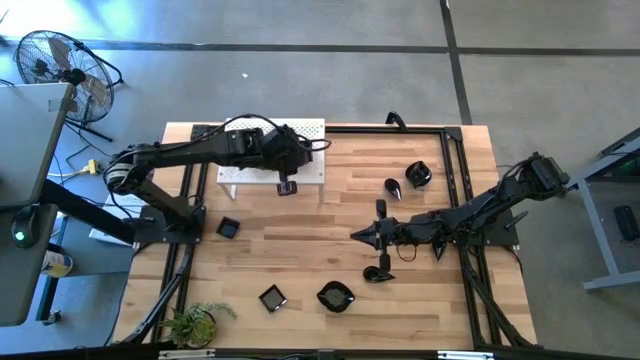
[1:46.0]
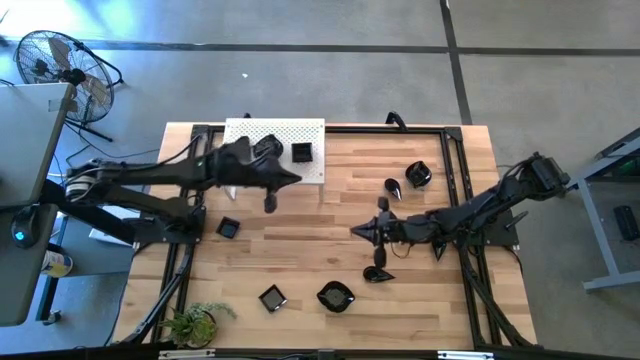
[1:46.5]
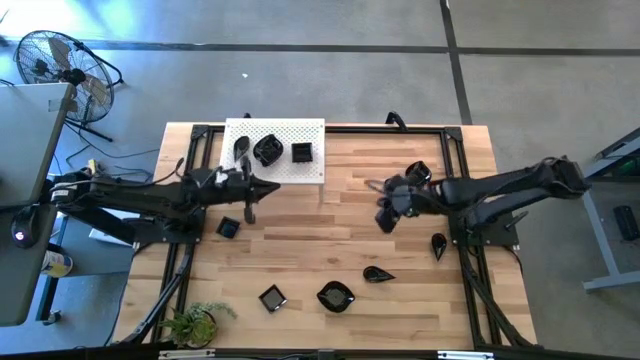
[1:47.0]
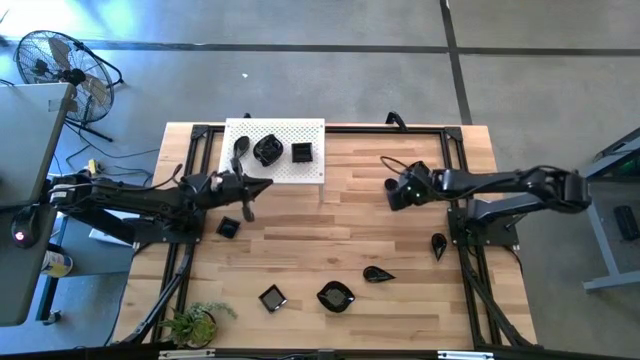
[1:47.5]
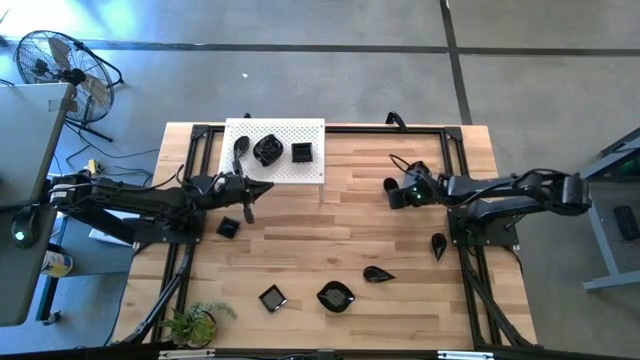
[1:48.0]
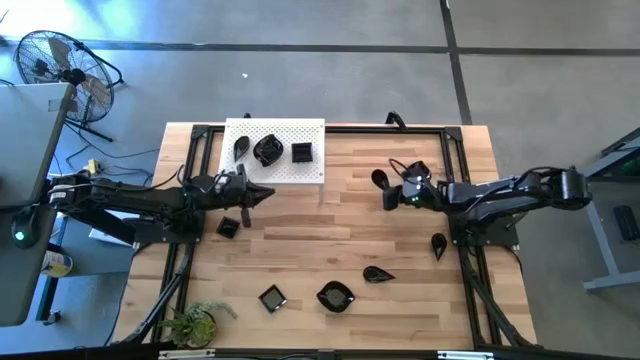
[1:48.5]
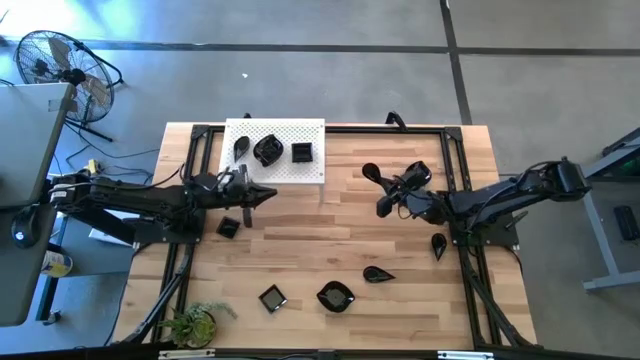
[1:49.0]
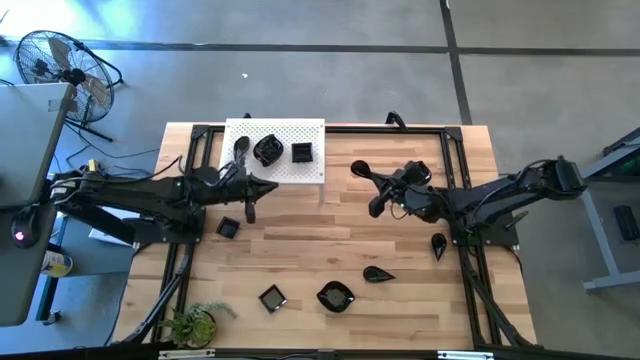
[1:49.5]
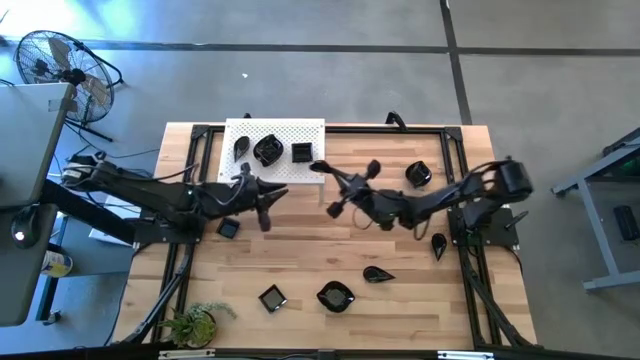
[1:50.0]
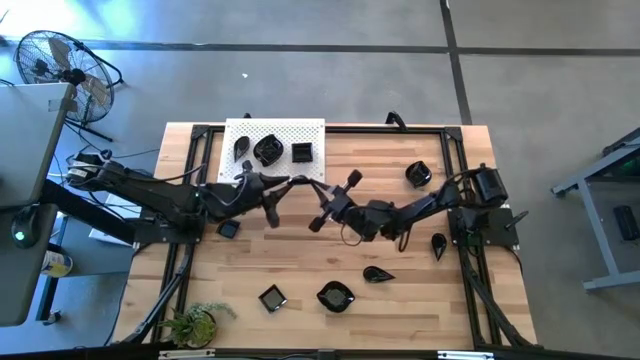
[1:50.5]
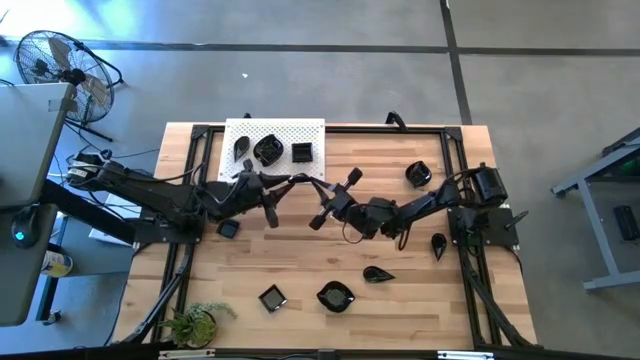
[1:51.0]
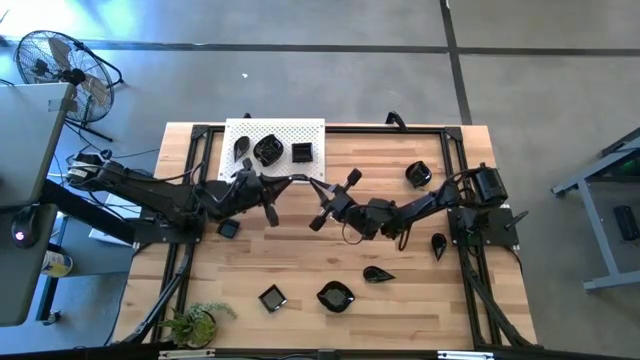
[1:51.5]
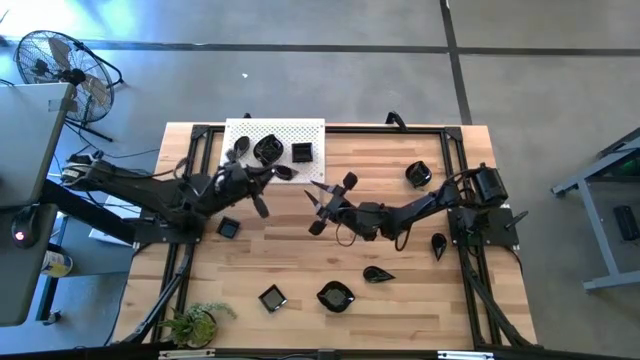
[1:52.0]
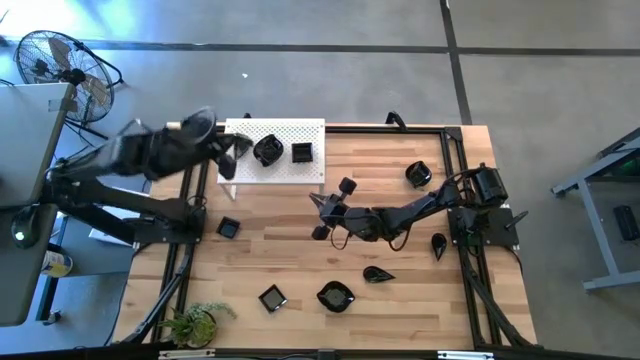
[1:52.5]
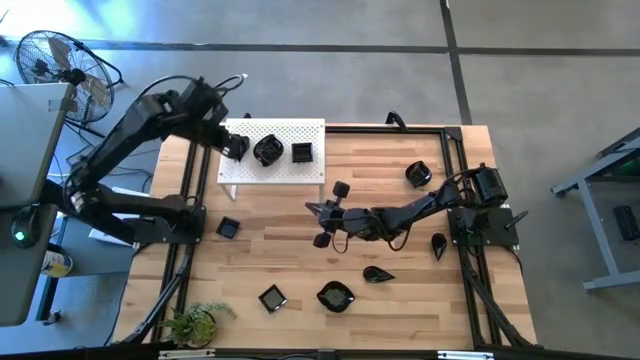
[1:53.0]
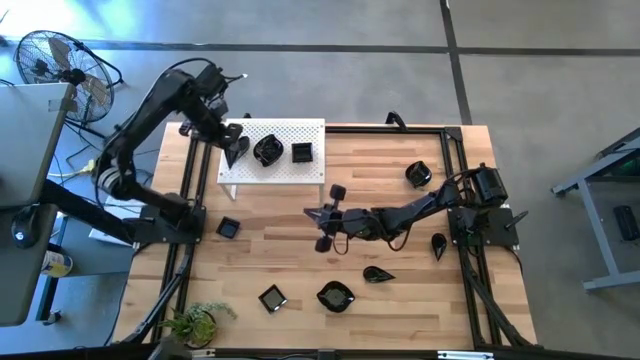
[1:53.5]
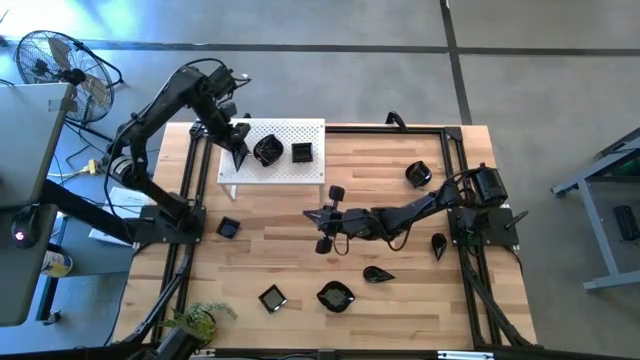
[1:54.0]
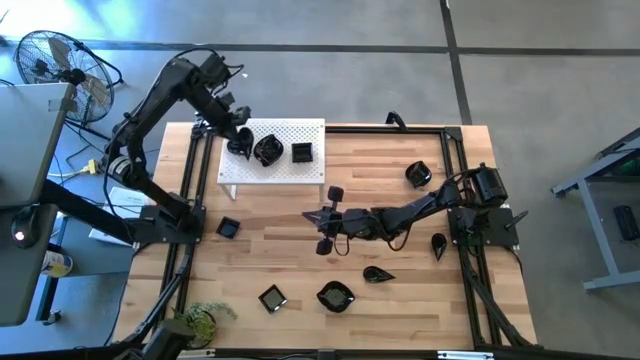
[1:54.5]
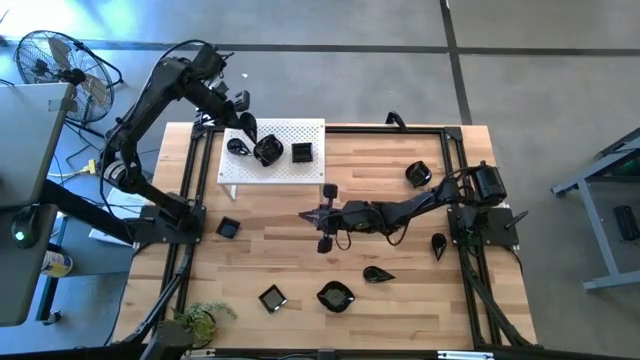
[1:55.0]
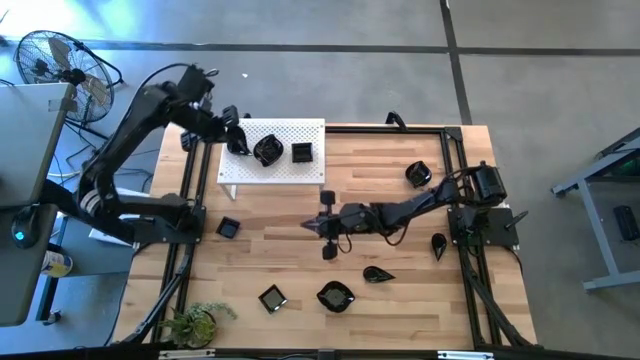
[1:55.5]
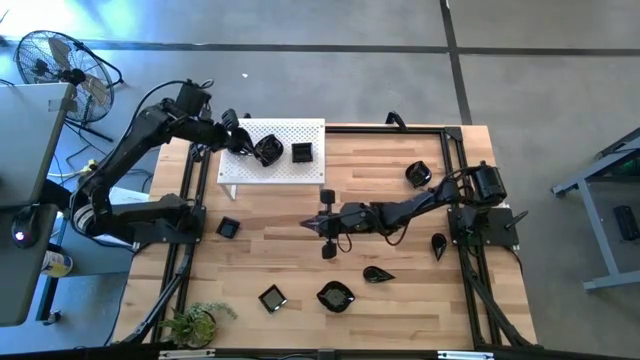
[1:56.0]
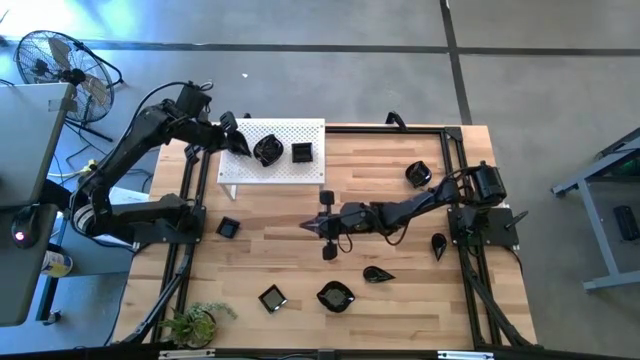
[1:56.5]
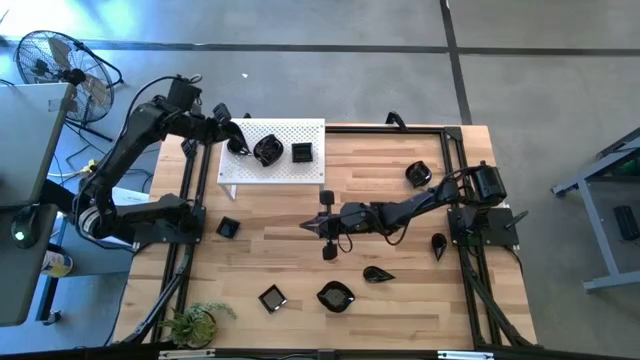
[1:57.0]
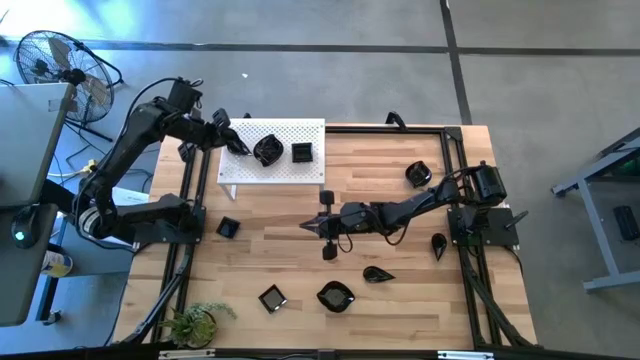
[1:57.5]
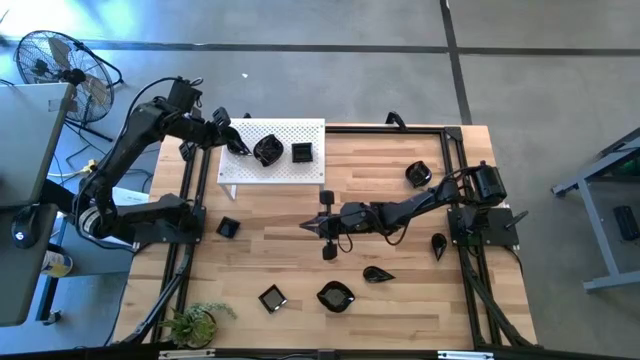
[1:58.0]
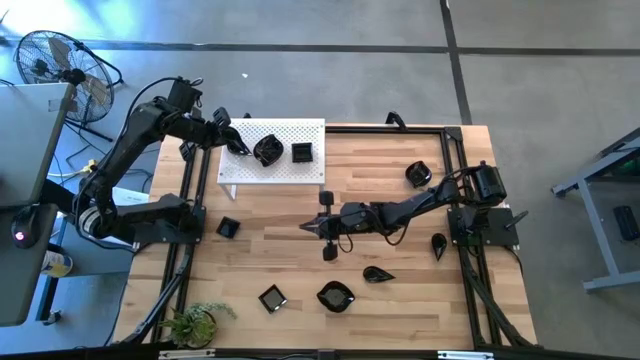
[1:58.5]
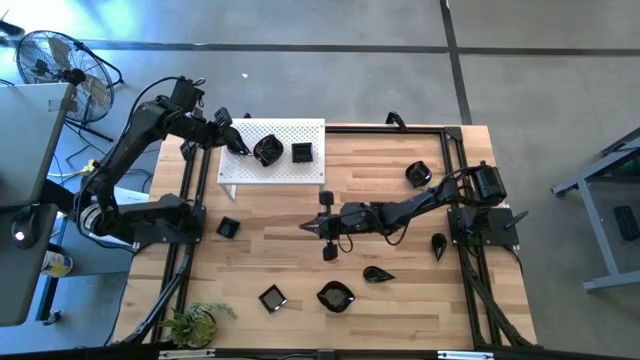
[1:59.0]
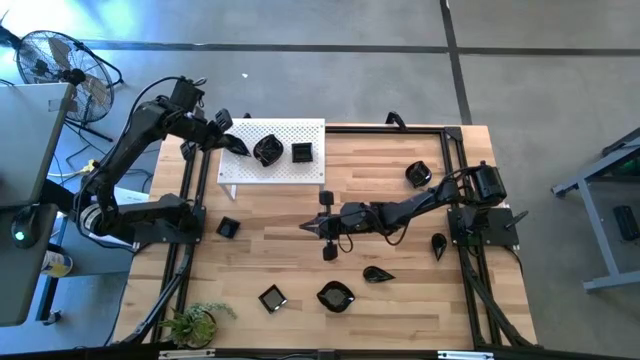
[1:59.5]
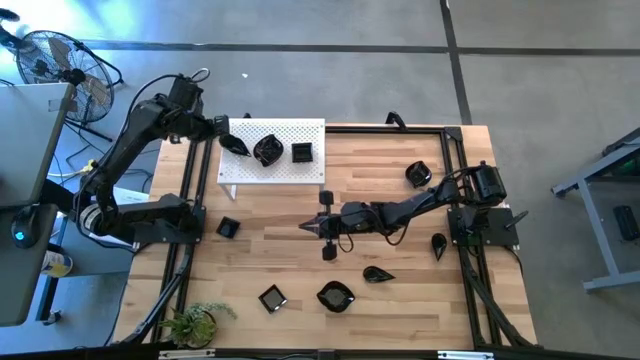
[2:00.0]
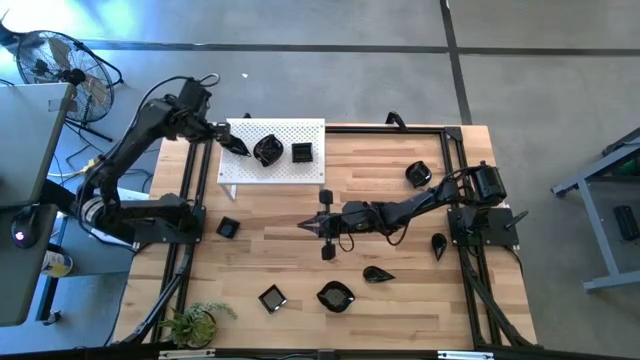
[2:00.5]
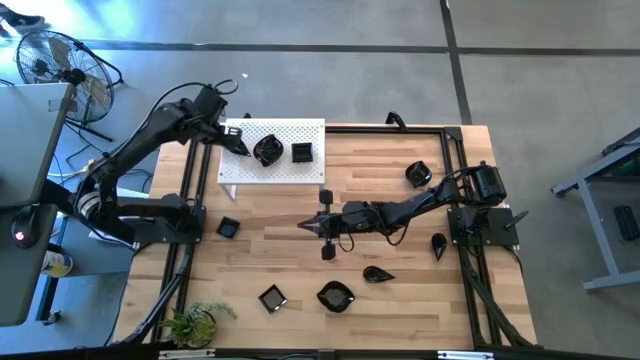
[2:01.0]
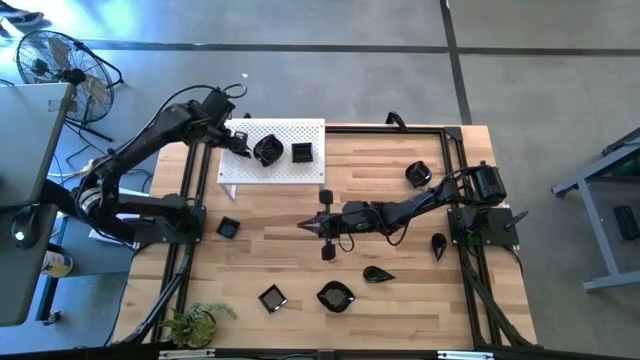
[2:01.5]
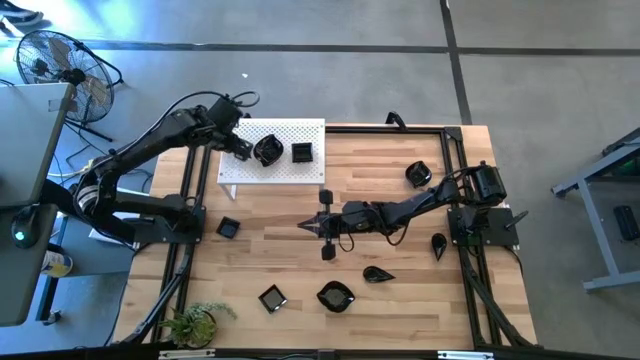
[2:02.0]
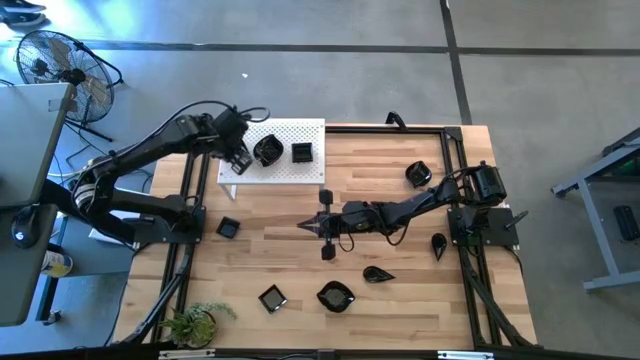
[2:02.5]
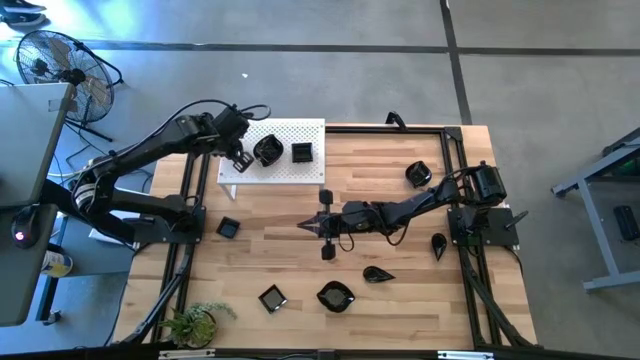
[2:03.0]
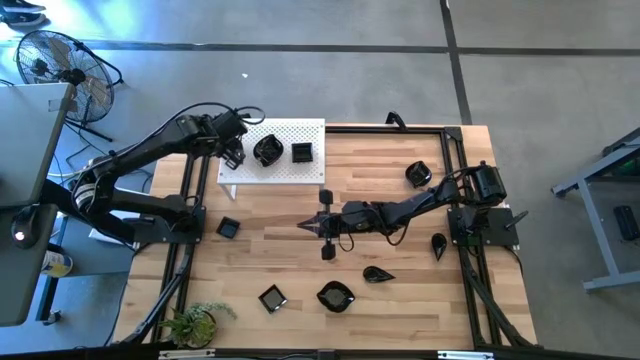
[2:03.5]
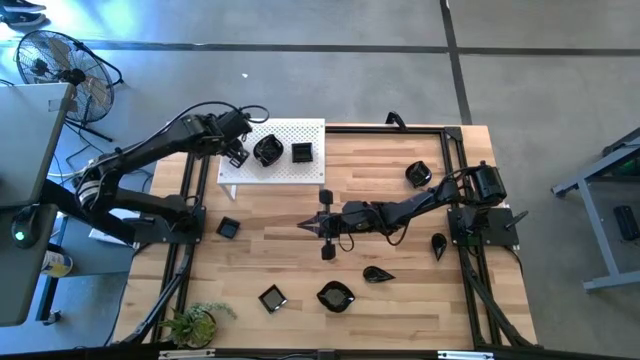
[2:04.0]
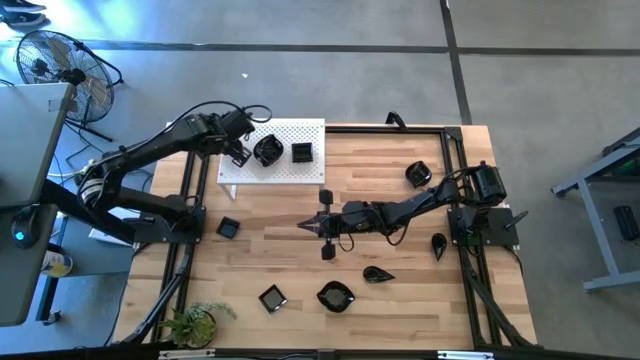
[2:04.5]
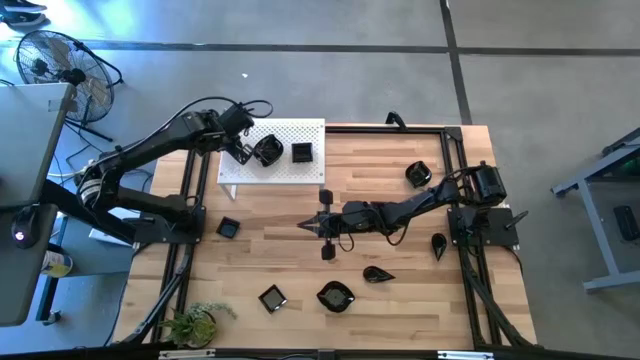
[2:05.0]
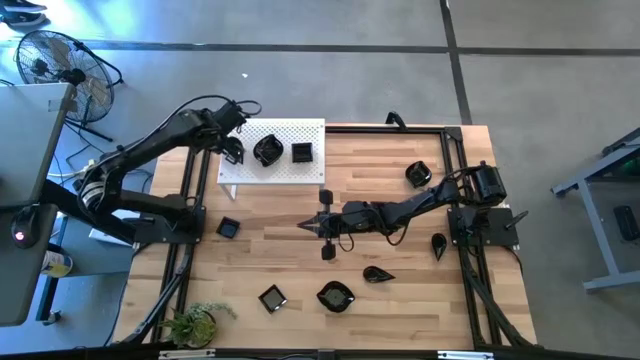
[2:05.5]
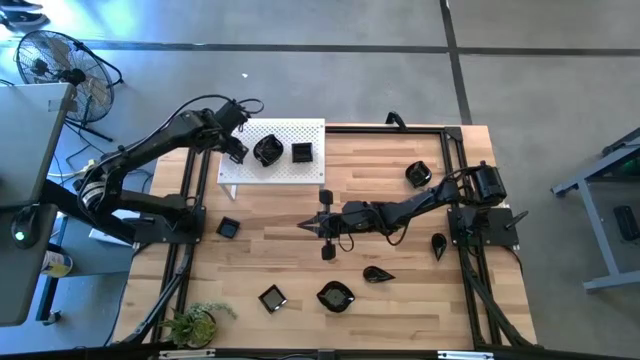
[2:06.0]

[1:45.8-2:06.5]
Task: Pick & Place Mini shaped plates
Stack the drop-shaped plate on top of the drop-shaped plate on the shelf

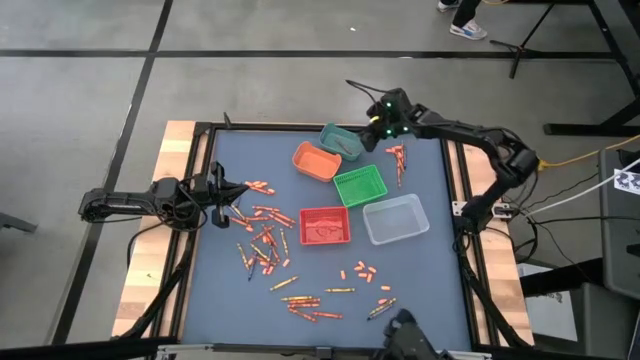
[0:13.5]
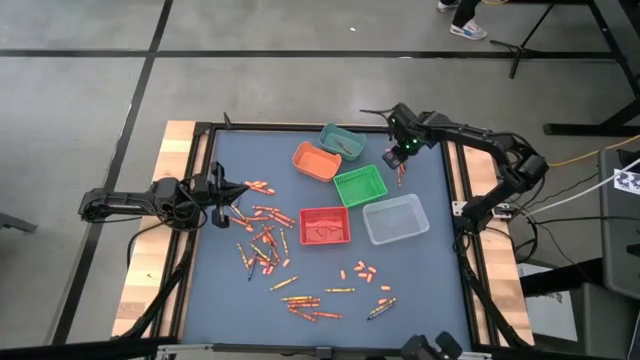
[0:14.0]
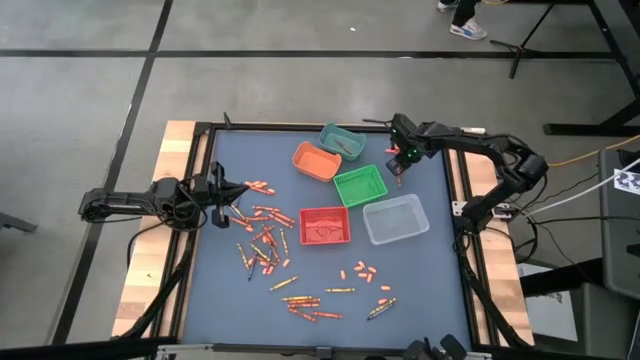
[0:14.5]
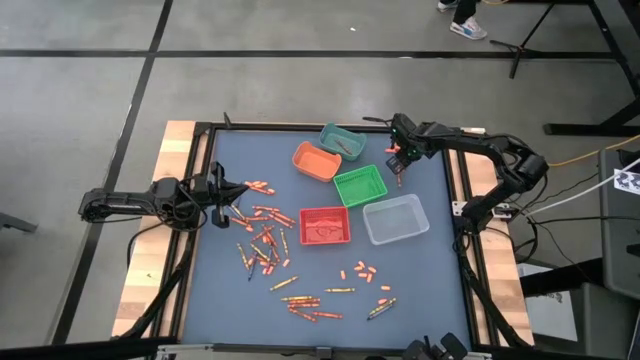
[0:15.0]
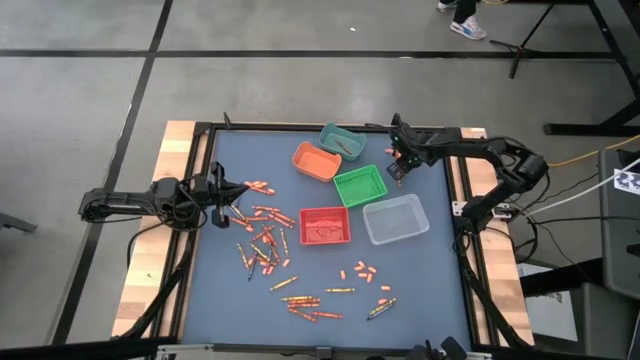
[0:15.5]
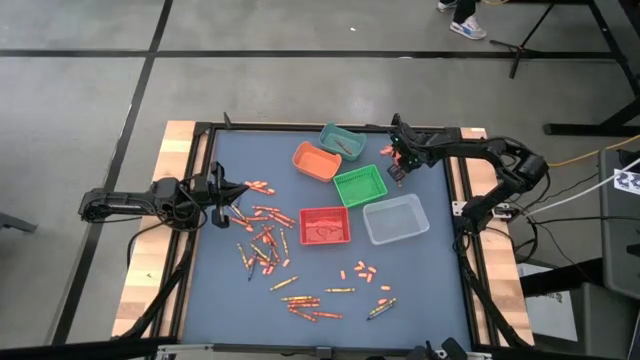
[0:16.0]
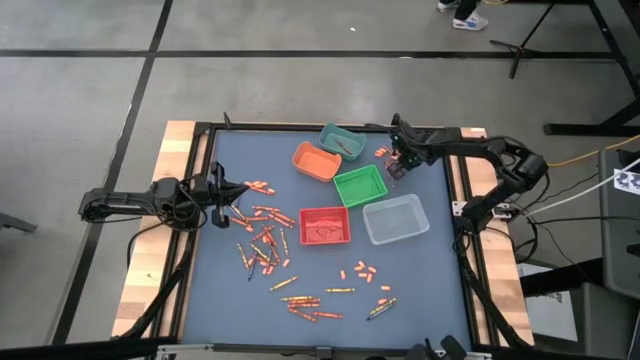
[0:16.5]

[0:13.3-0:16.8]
Task: Sort crayons
Put the blue crayon into the green bin
